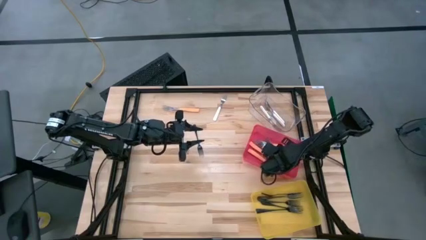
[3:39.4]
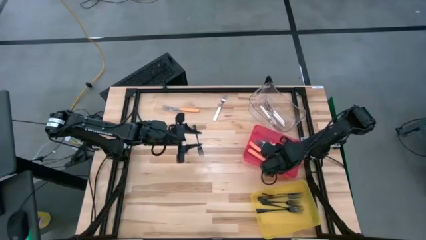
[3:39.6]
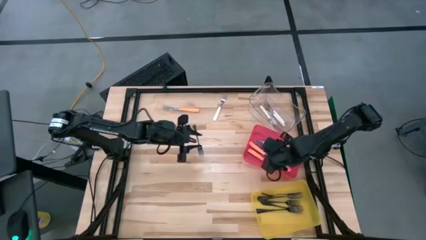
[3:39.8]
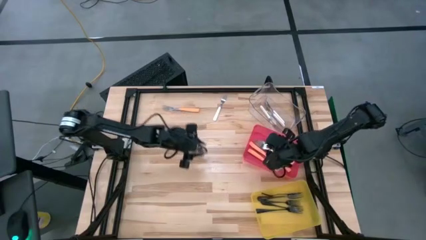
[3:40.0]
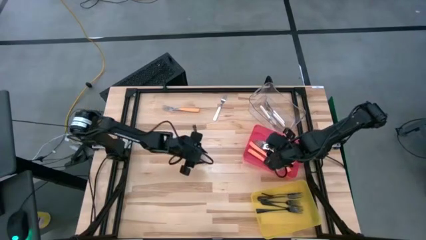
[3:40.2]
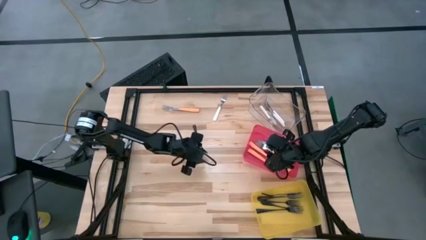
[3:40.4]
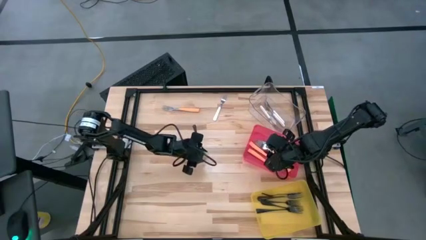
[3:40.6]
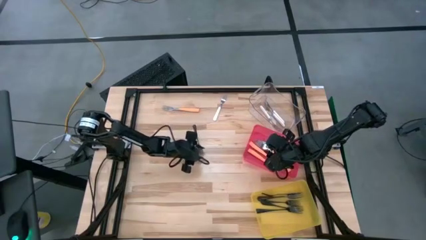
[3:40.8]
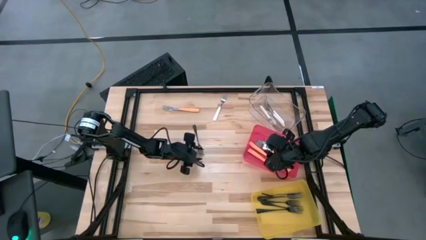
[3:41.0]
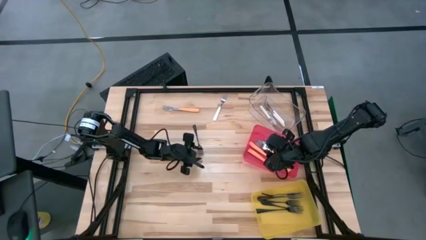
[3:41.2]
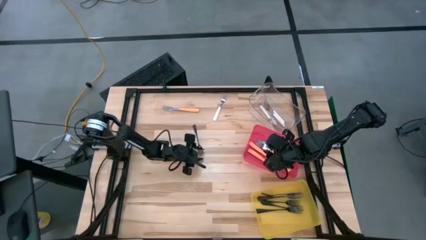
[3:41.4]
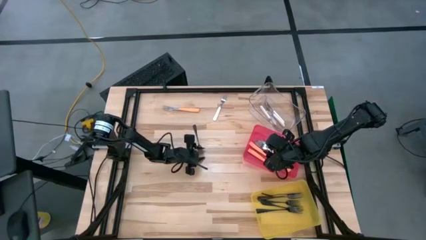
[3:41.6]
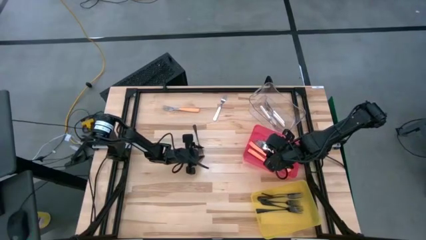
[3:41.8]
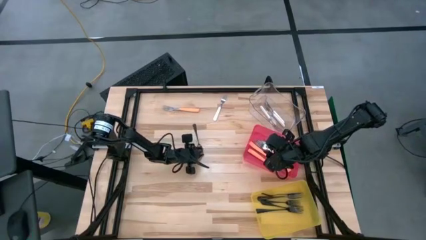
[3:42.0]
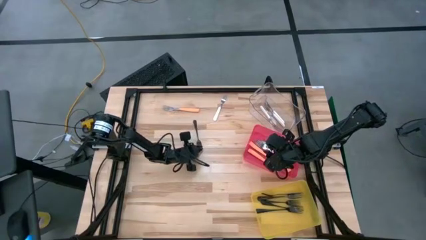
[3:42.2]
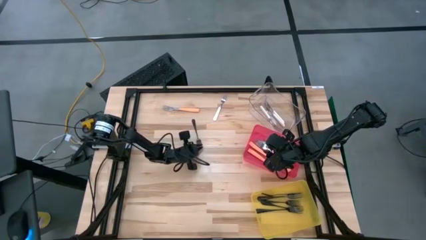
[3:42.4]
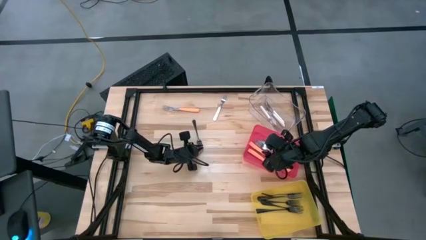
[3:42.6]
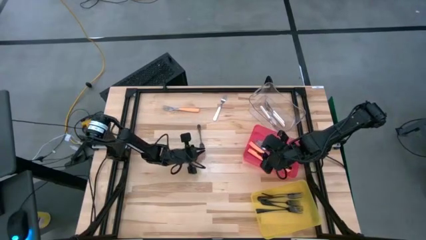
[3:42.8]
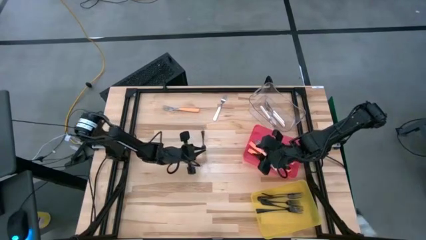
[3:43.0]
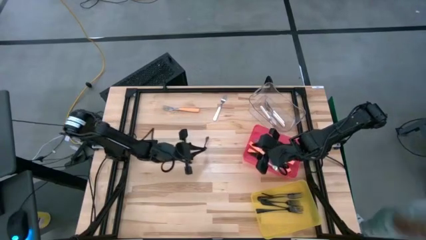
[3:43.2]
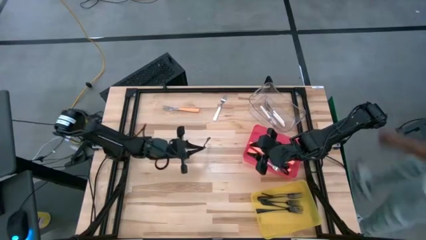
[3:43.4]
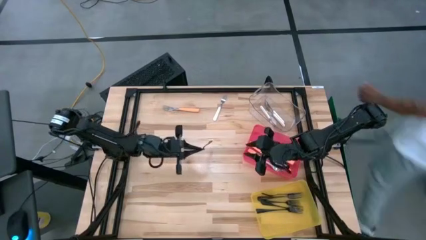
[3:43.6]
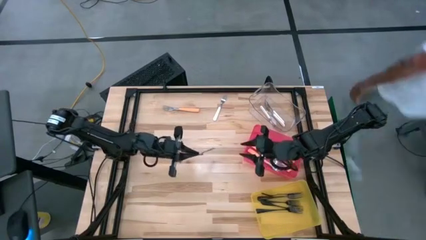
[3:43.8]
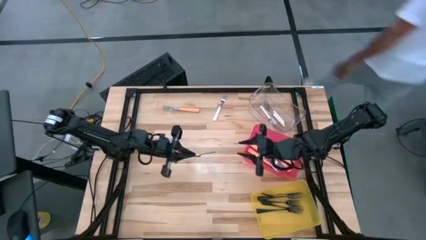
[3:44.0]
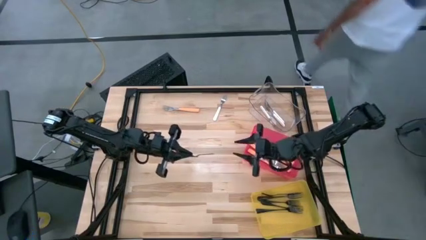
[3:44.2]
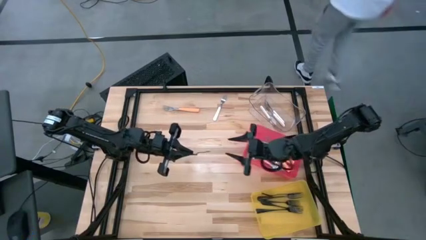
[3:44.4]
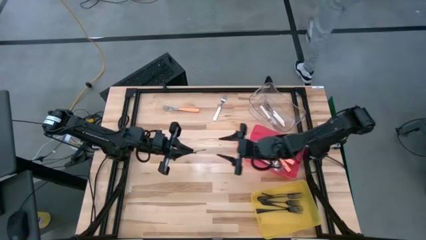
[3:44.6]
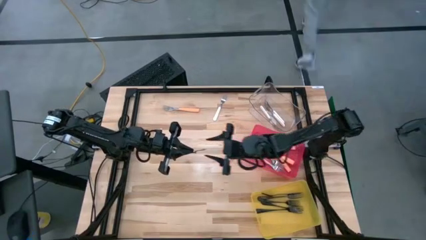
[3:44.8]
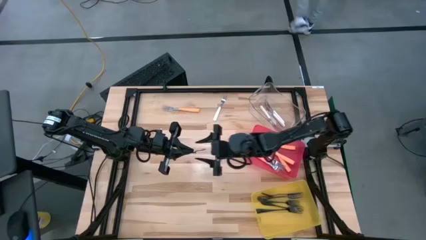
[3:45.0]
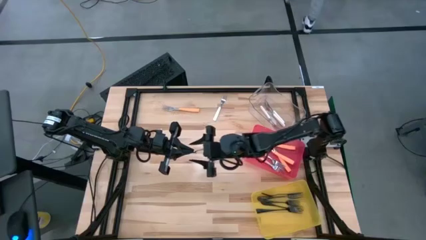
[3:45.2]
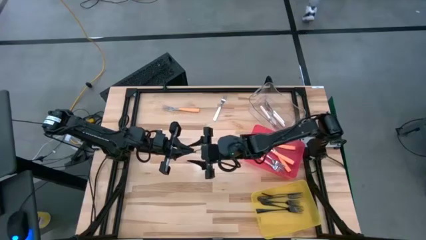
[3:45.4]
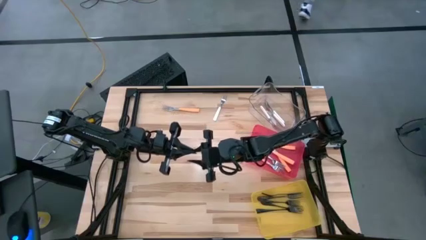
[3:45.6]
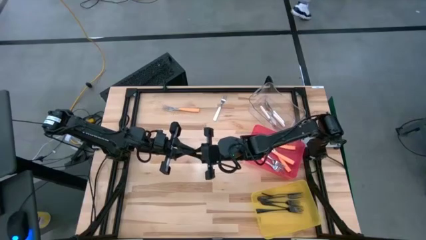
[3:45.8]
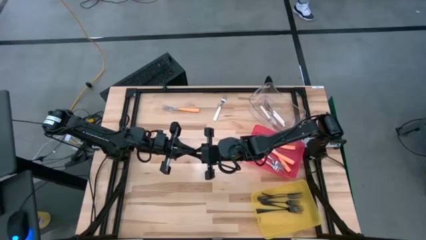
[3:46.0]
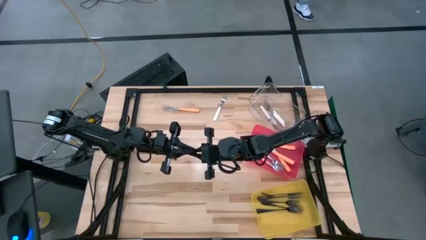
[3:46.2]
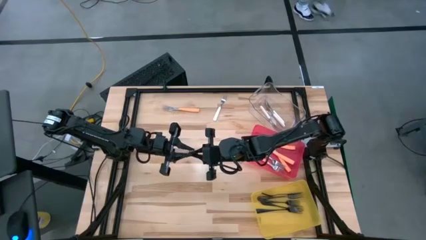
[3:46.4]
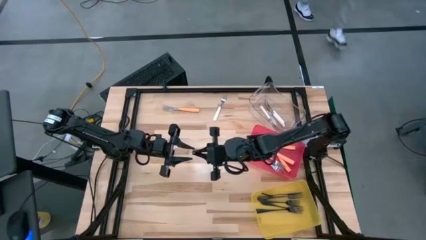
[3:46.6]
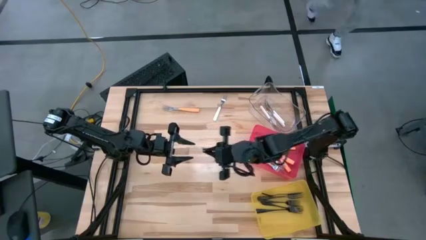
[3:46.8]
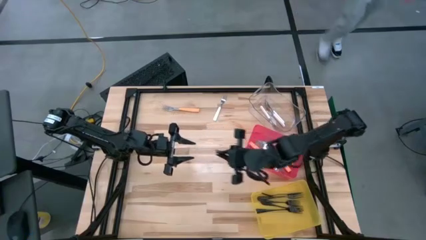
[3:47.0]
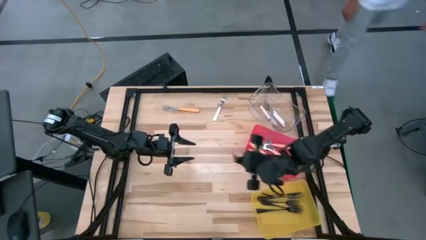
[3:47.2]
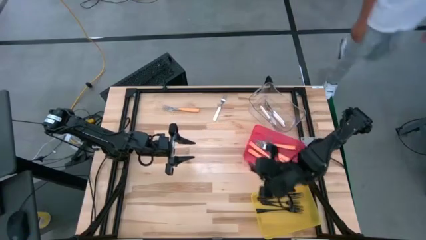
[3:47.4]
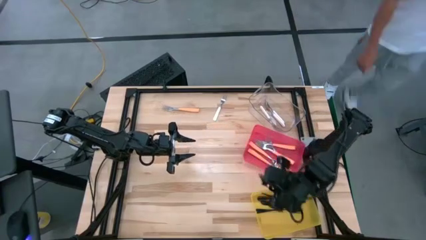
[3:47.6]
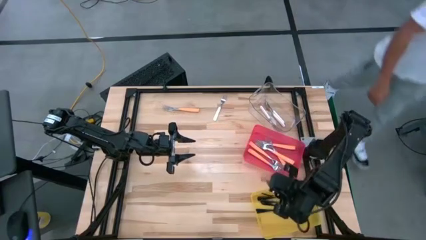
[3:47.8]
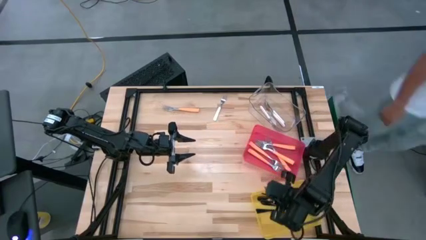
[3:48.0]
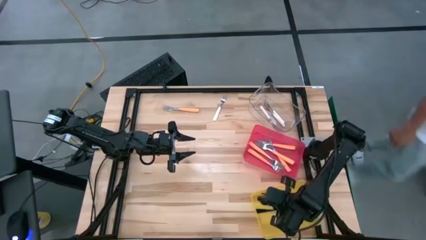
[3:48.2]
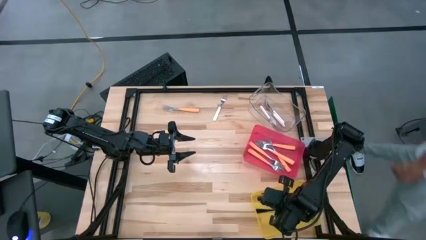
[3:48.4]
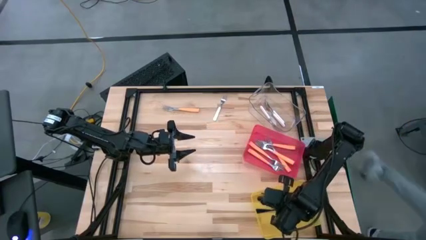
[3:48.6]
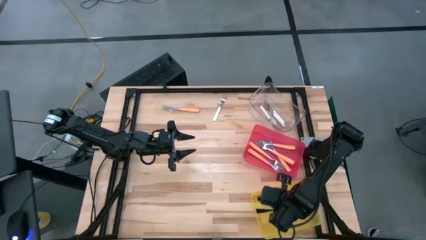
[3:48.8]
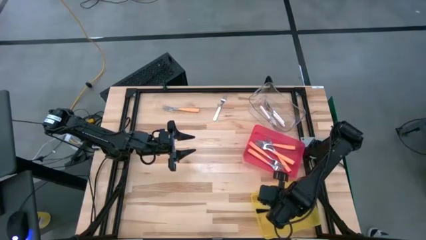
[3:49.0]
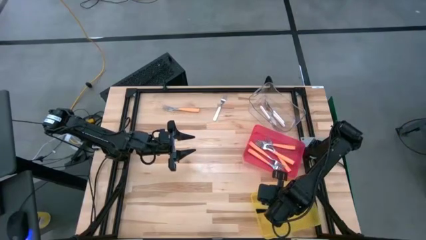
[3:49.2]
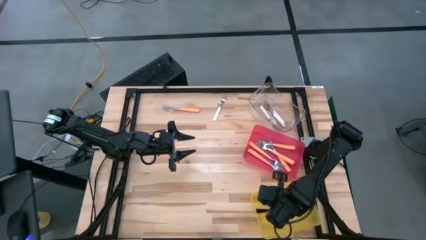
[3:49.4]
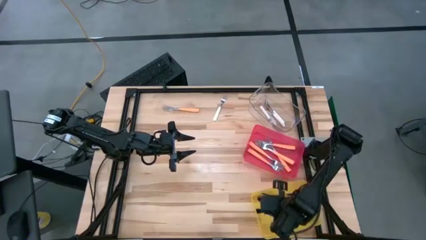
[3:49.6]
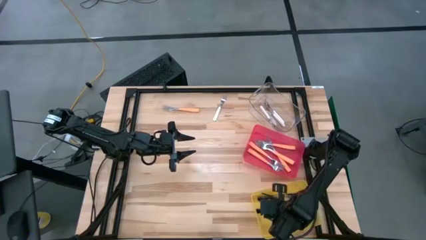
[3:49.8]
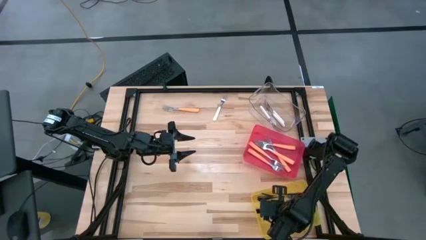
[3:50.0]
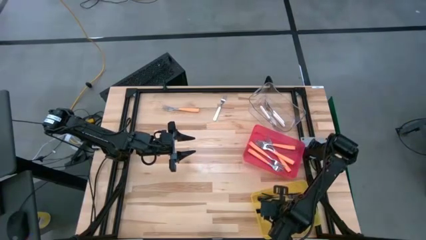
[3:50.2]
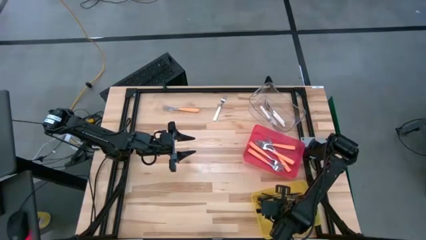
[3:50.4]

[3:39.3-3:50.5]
Task: Sort silverware by color (type)
Put the black fork into the yellow bin

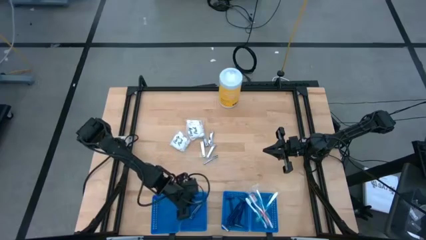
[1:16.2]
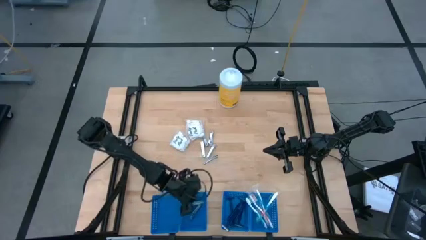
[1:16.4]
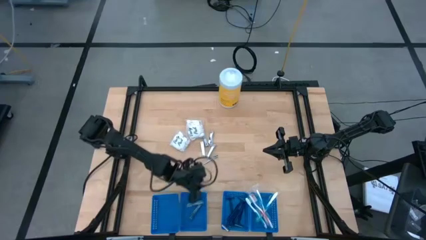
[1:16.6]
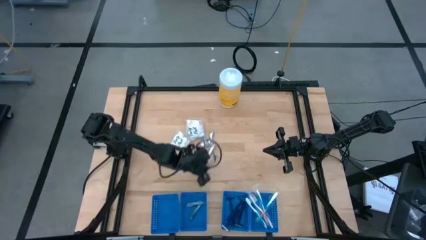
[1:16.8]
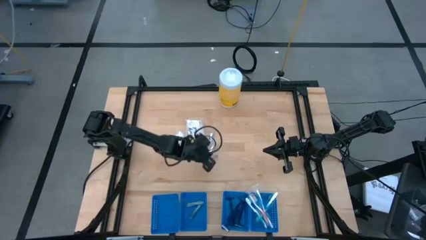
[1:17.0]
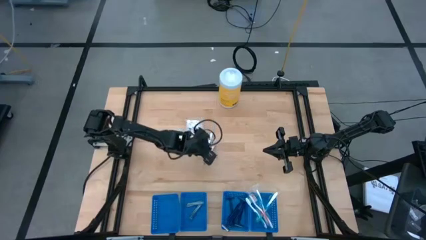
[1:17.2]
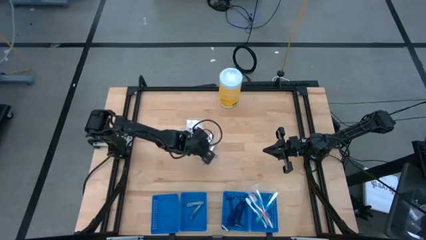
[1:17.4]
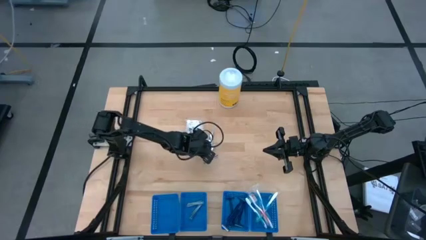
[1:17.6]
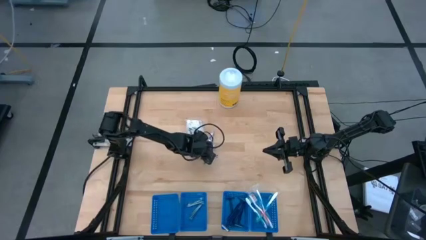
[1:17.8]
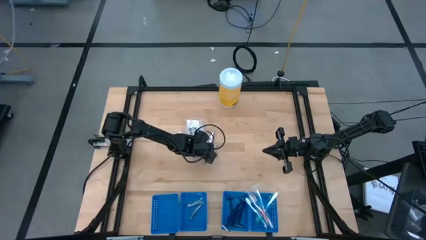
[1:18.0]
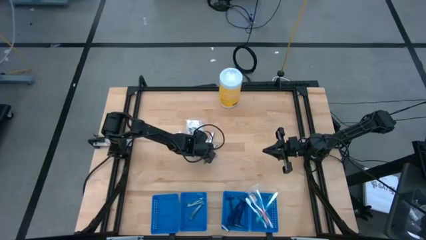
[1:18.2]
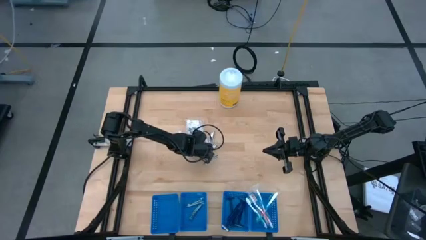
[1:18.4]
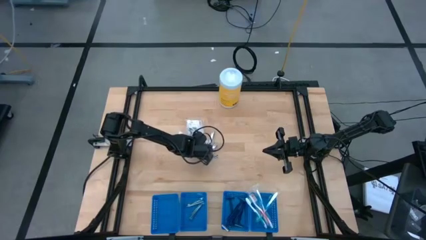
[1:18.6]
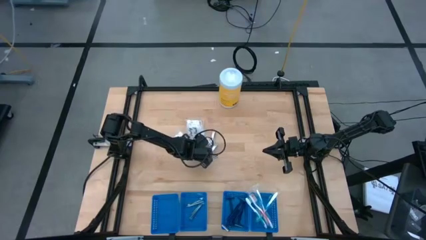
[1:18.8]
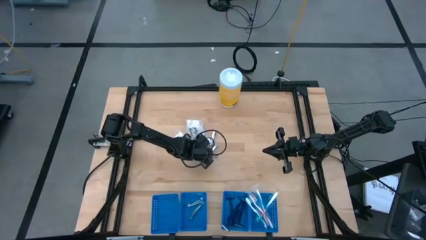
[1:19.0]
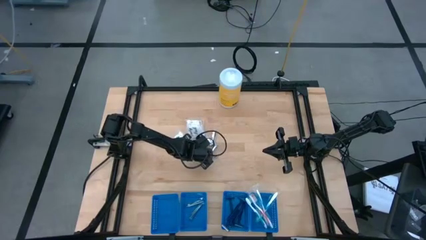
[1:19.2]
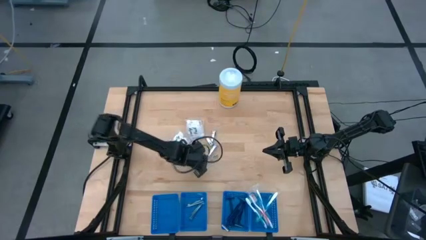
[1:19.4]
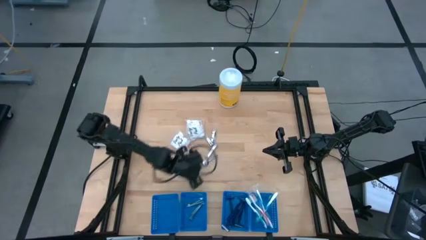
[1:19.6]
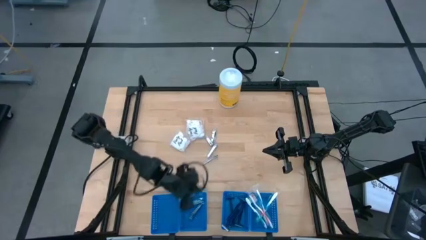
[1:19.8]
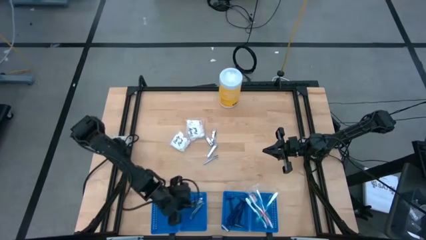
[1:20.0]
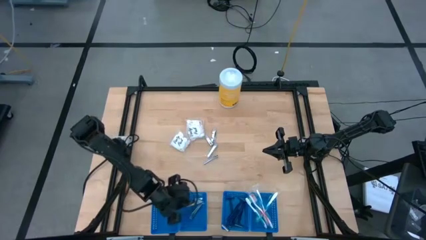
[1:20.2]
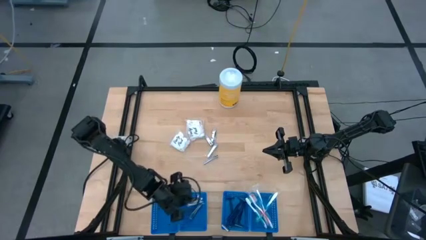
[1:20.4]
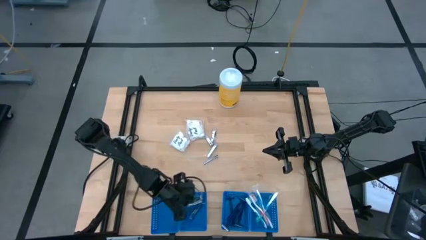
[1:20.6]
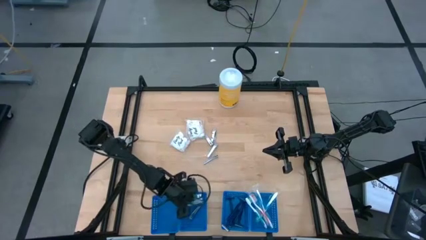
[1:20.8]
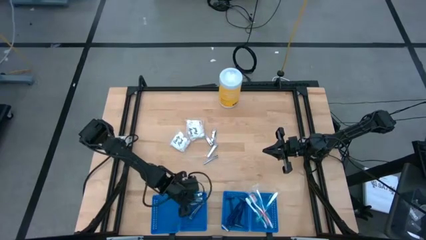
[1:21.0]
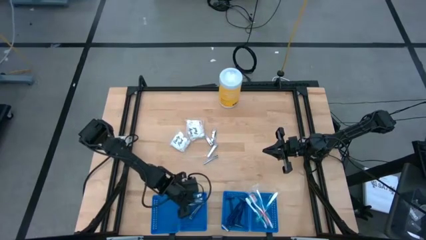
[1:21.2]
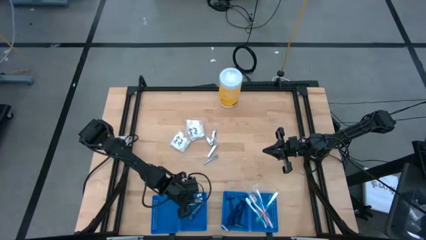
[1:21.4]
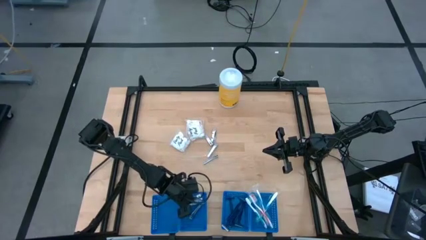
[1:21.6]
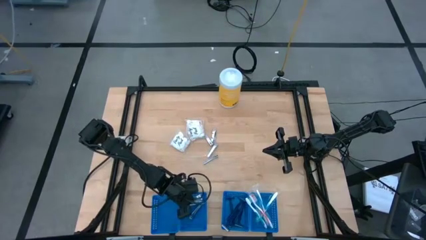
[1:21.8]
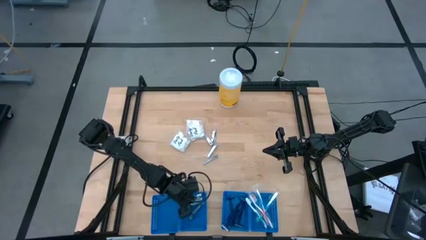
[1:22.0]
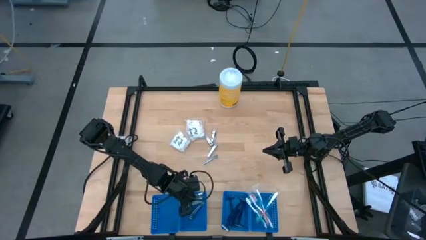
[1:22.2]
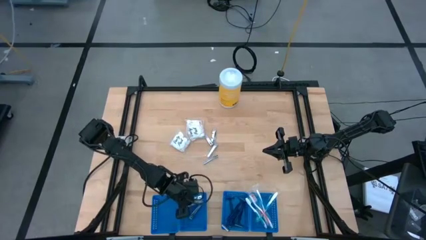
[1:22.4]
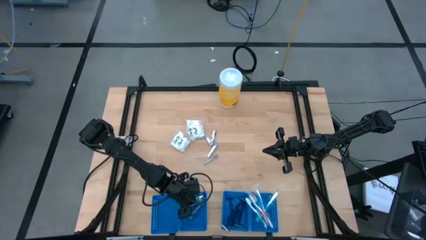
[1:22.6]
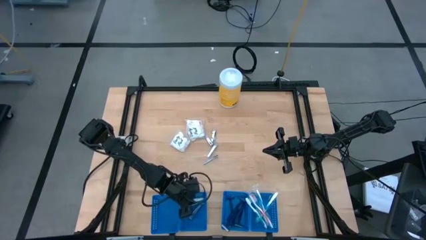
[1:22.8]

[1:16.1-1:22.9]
Task: Pick & Place Travel size toiletries
Put the silver nail cutter into the blue basket
